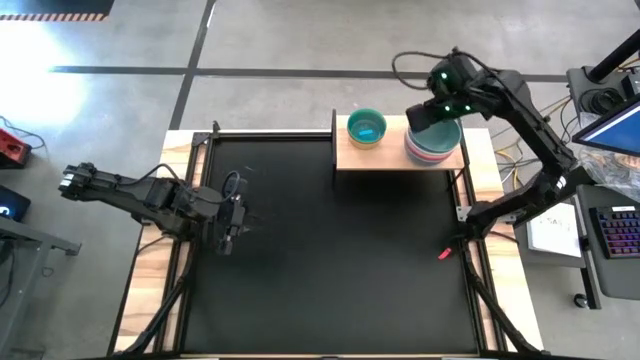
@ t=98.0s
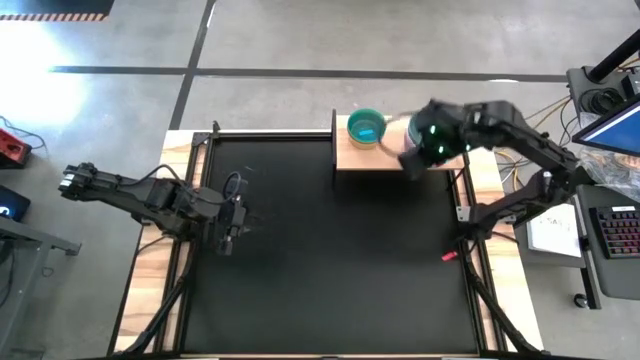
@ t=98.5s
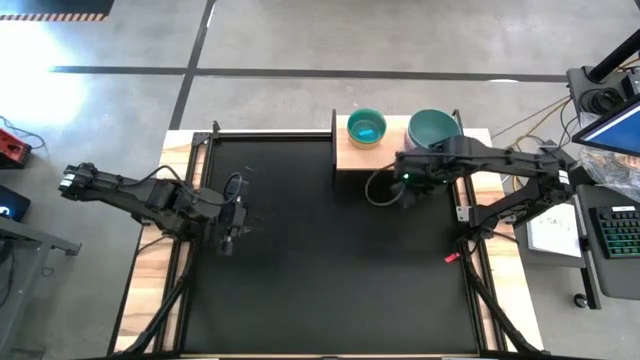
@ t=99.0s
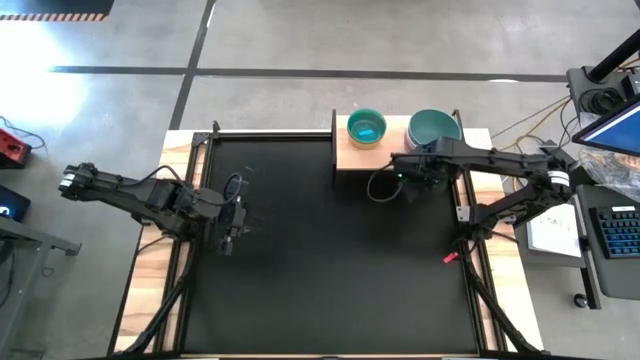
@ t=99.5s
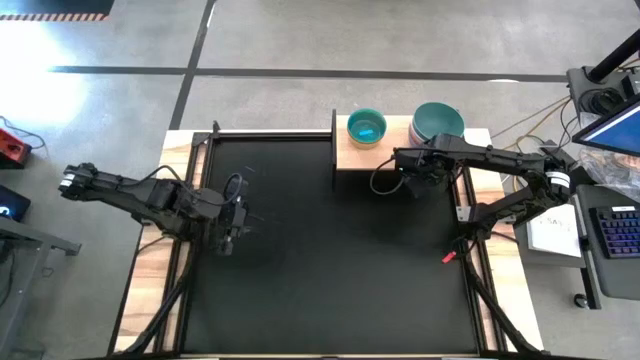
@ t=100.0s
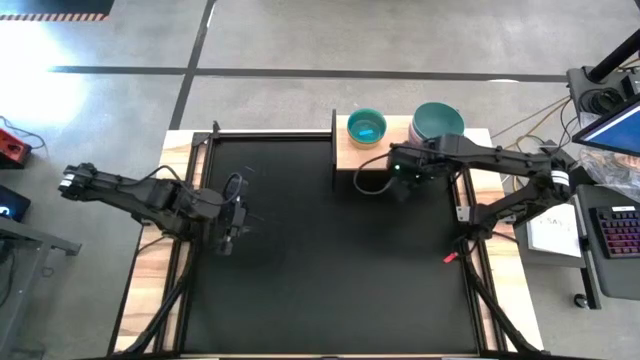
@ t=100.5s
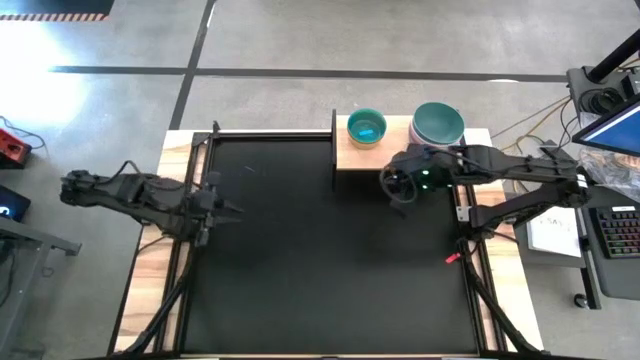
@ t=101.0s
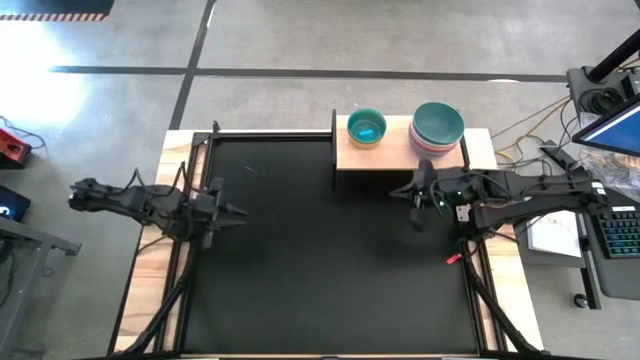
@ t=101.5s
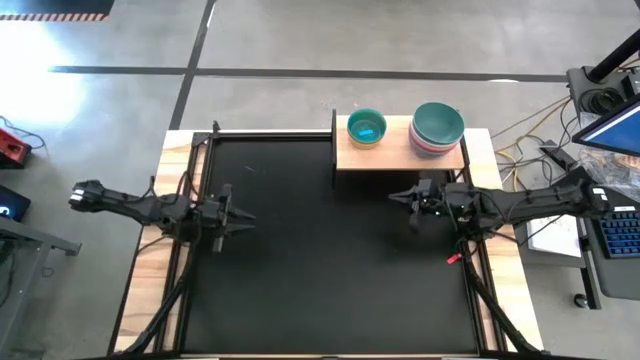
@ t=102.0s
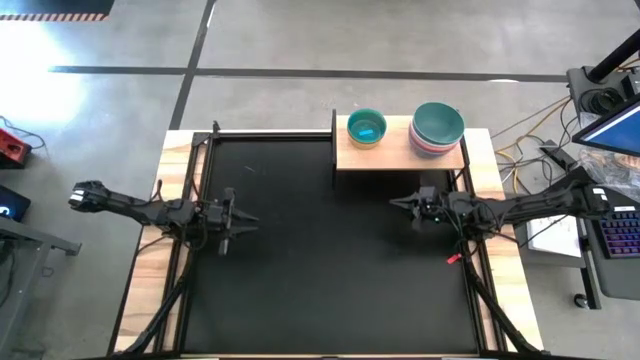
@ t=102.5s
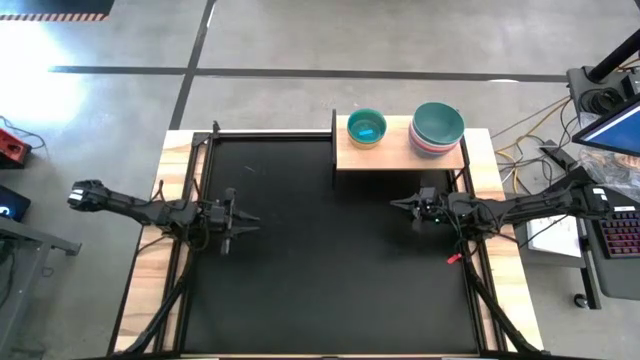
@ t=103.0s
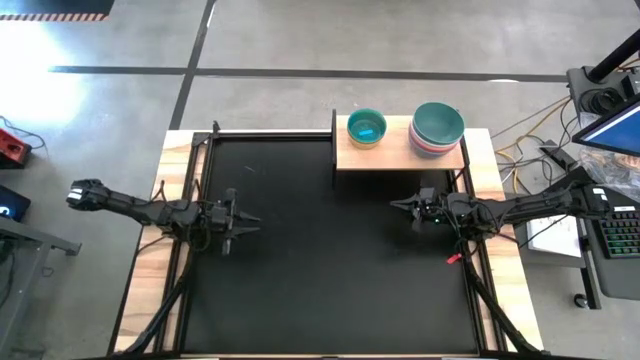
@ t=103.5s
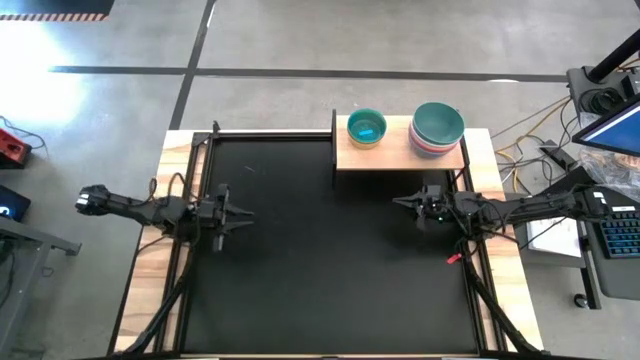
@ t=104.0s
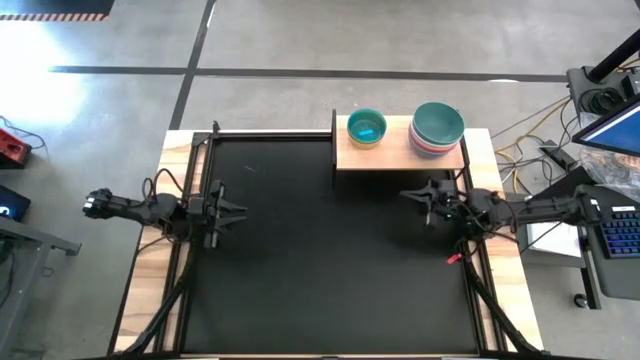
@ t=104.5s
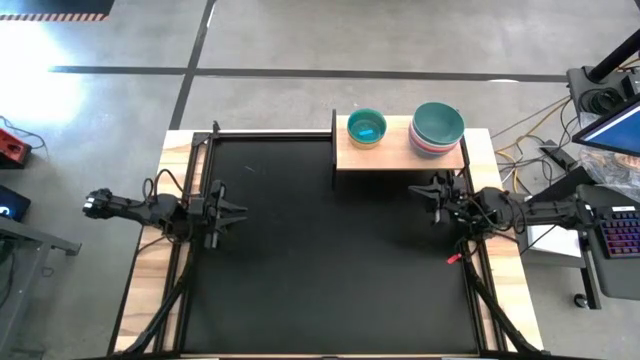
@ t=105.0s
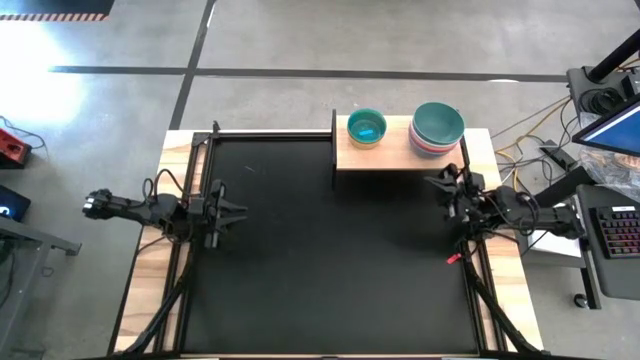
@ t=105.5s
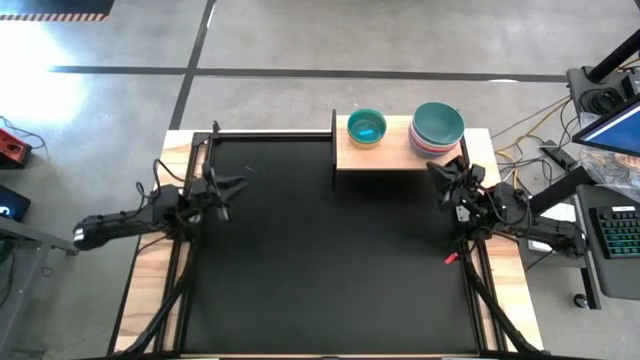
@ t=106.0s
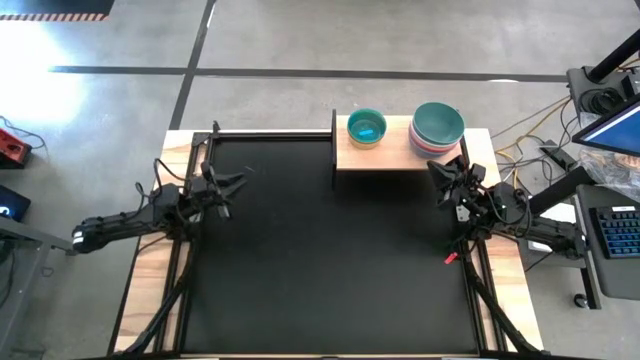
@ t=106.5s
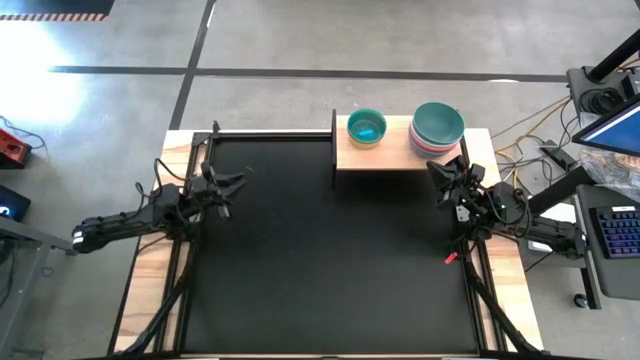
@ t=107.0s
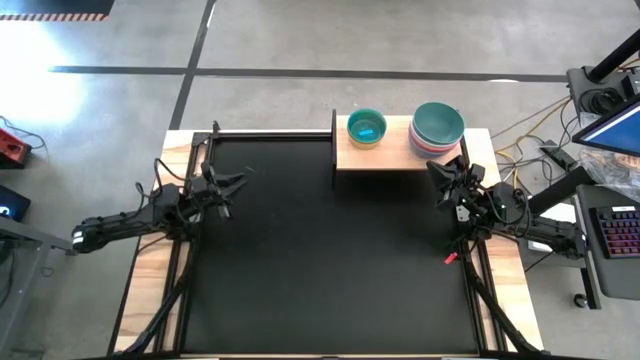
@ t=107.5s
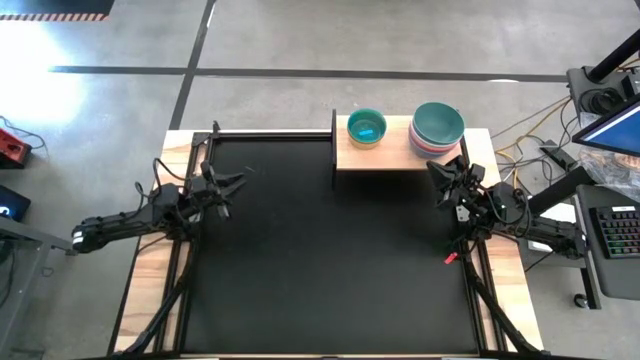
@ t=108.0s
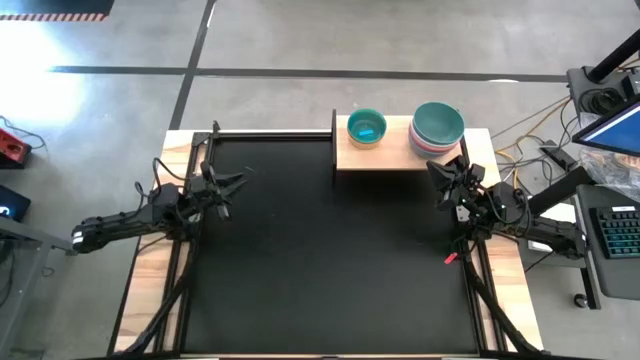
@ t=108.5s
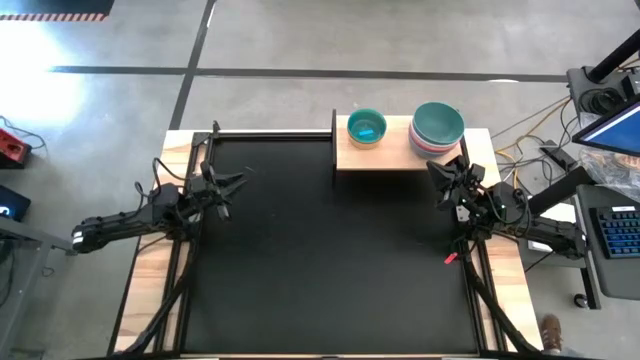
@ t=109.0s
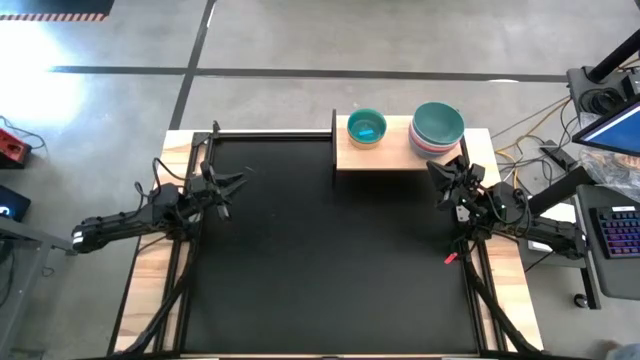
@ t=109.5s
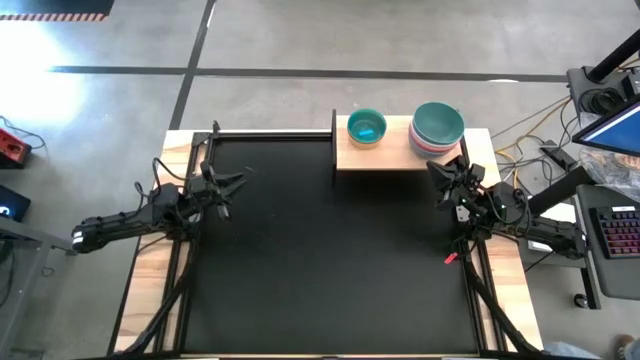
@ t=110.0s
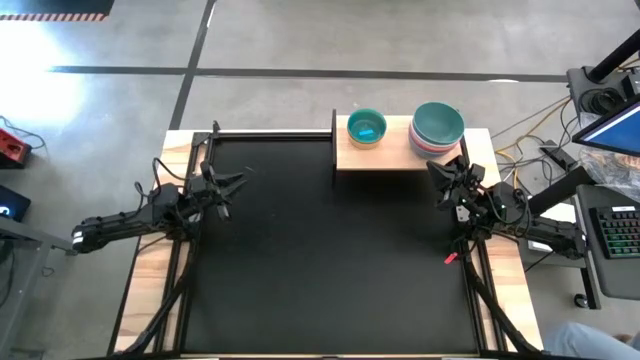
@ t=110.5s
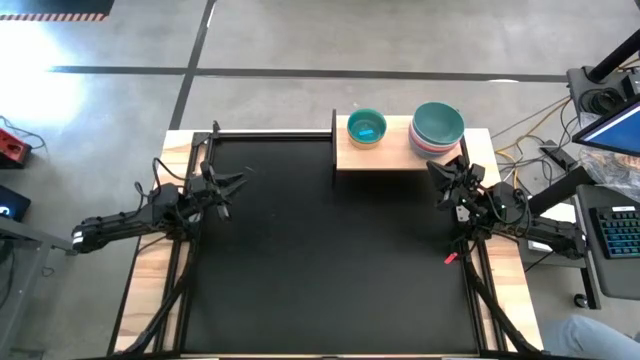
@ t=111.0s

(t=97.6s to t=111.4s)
Task: Place and stack bowls onto a shelf
Return to Home Position

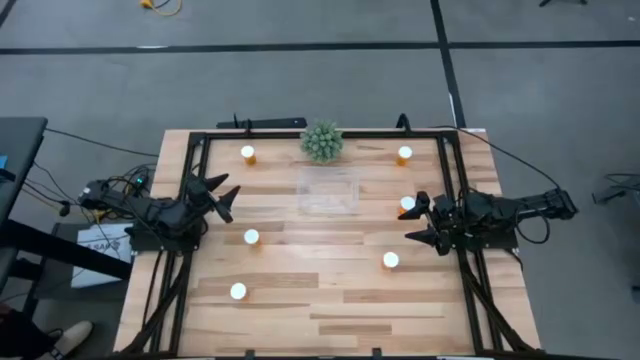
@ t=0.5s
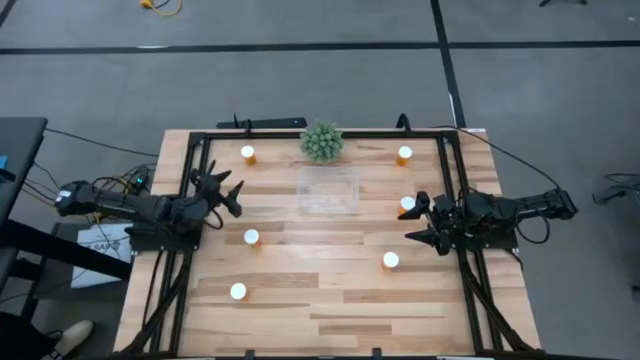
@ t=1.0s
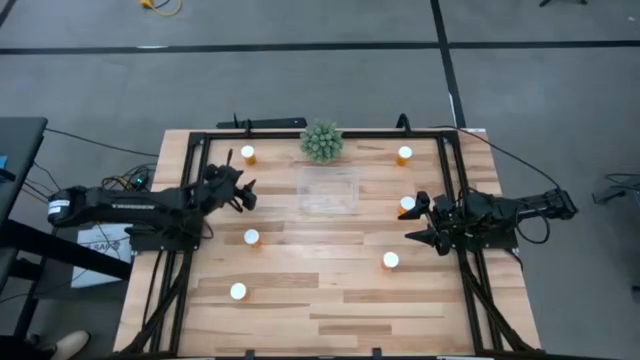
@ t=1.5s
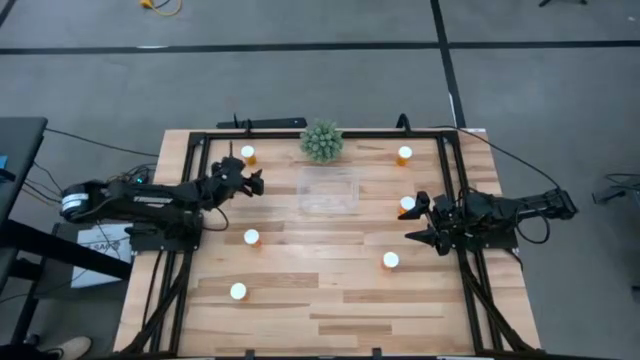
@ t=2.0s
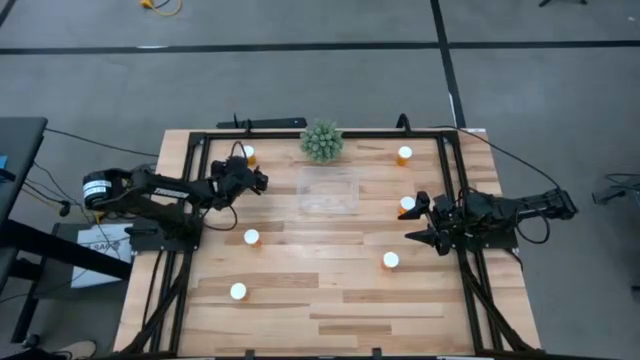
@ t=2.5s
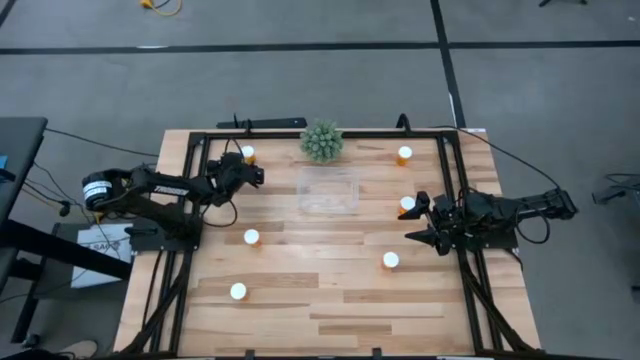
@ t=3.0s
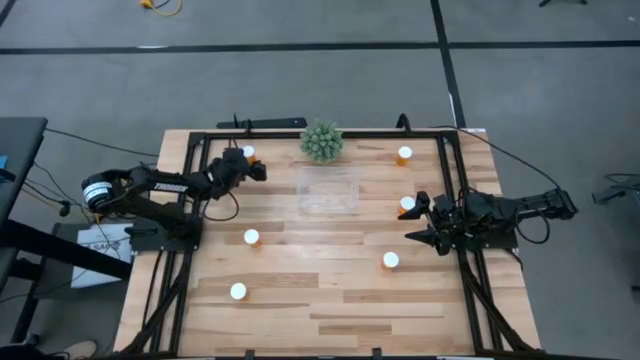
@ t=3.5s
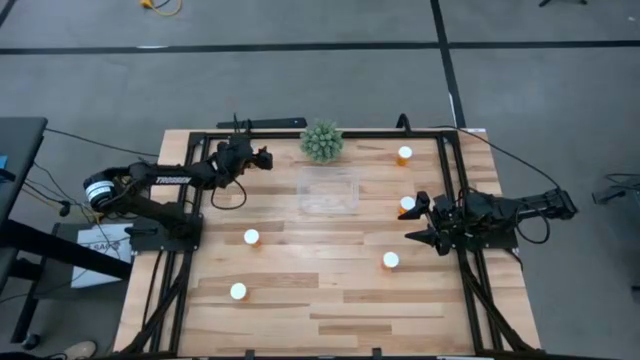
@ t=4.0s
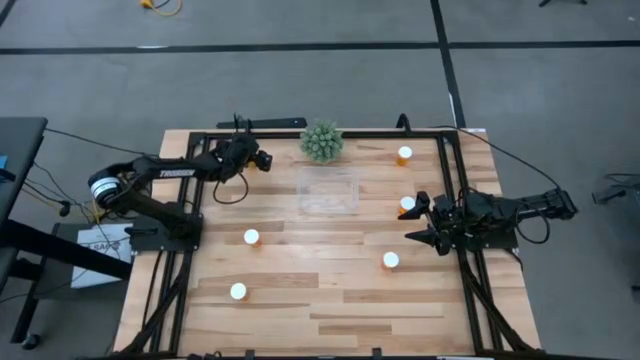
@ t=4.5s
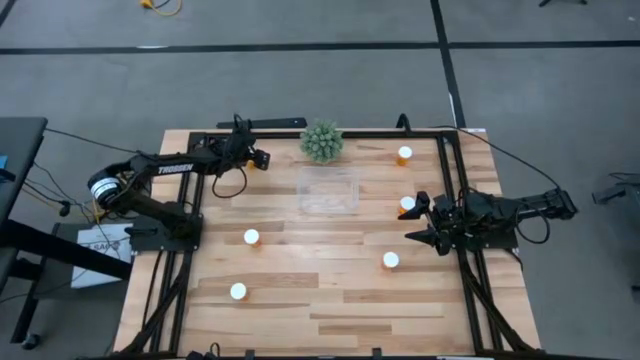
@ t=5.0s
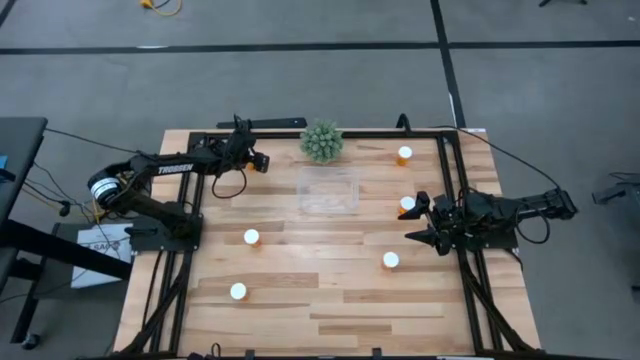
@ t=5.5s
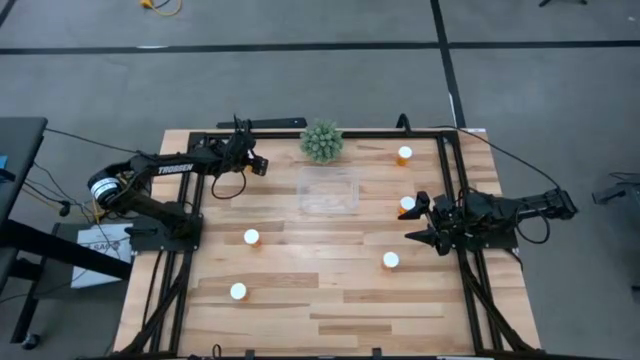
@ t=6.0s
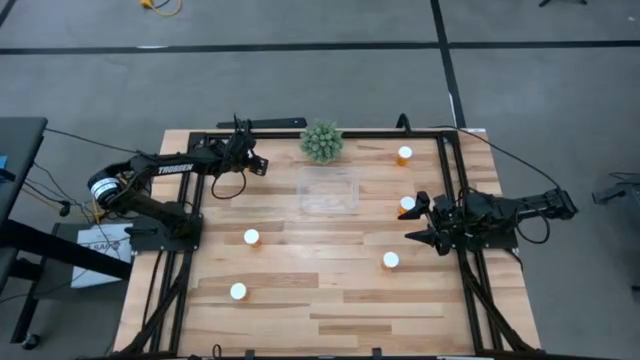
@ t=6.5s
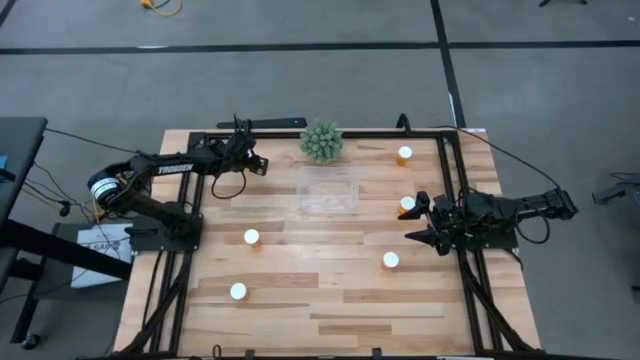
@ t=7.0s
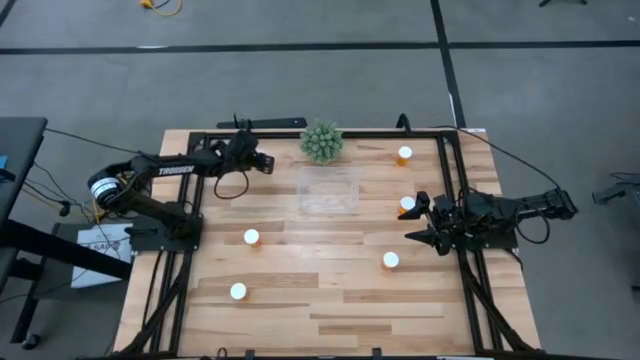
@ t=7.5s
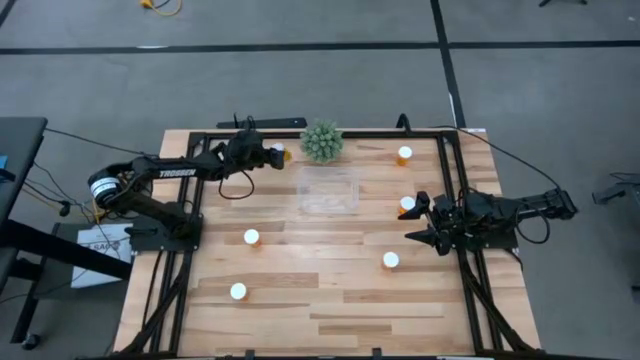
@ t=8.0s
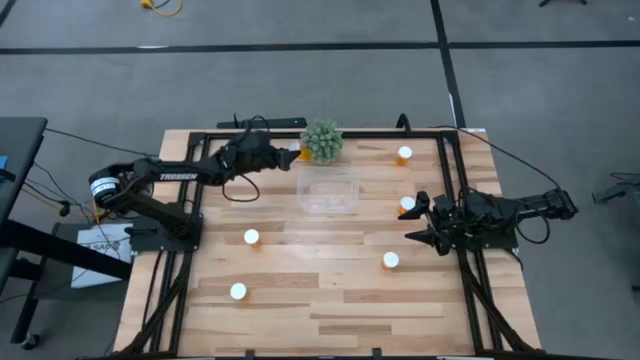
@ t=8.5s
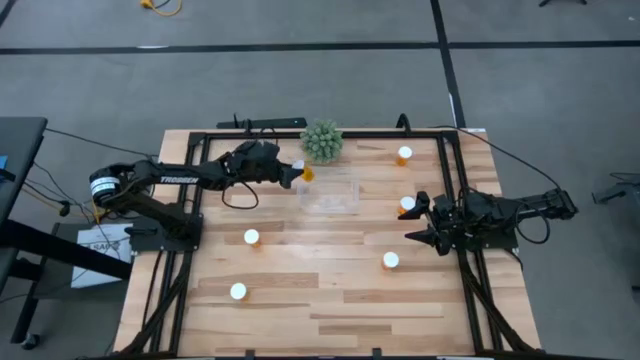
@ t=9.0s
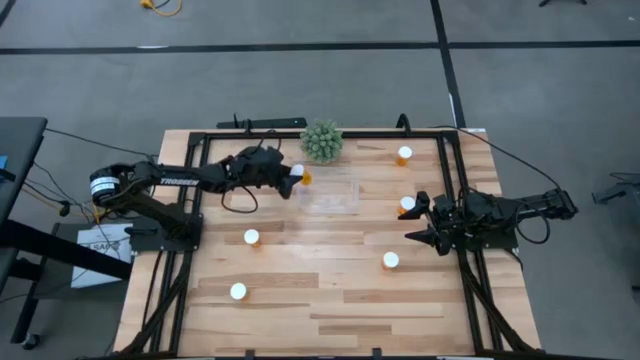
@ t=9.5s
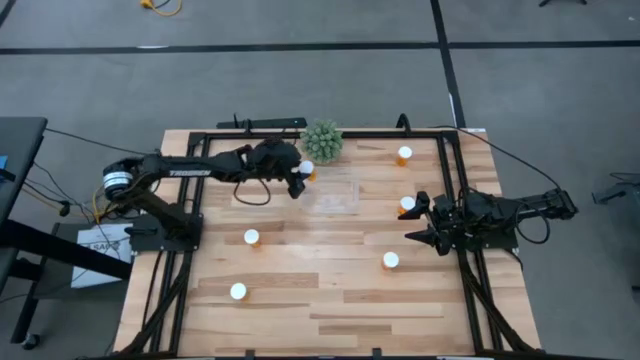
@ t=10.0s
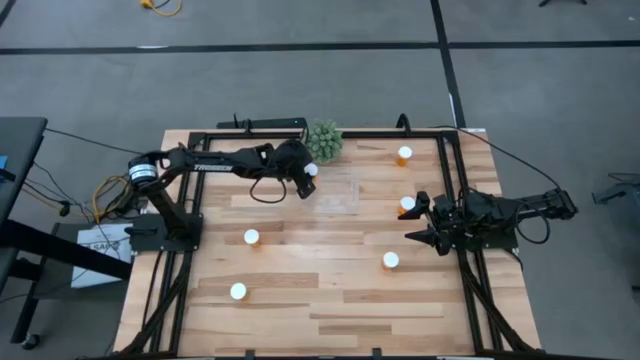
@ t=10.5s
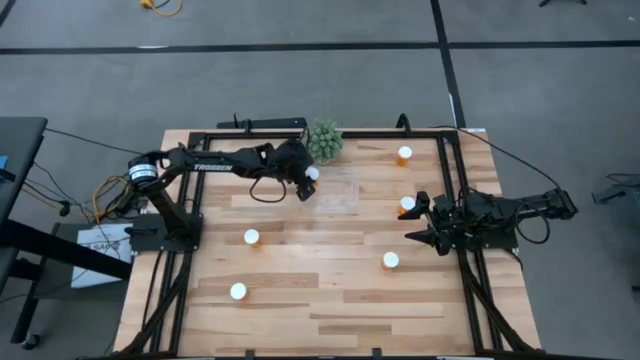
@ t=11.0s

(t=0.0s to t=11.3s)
Task: Pick and place pill bottles into a basket
Put the orange pill bottle into the transparent bin
